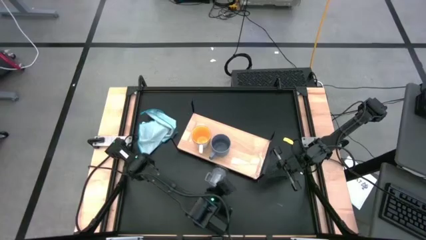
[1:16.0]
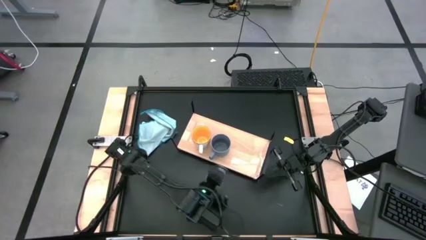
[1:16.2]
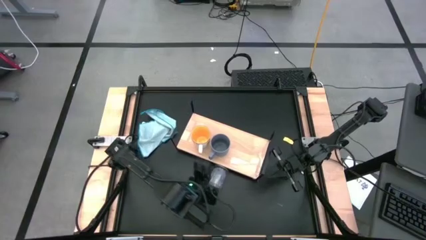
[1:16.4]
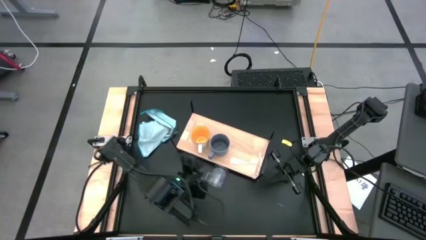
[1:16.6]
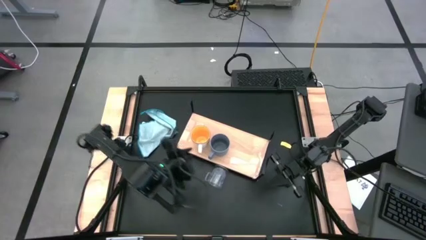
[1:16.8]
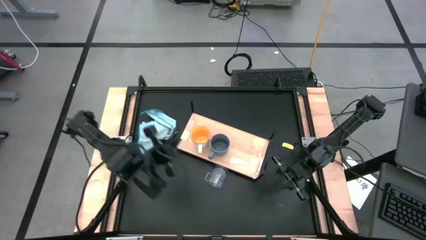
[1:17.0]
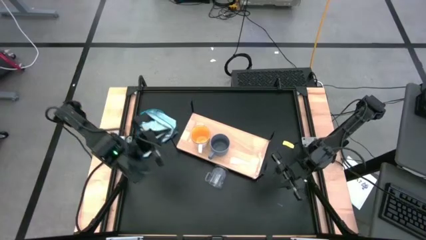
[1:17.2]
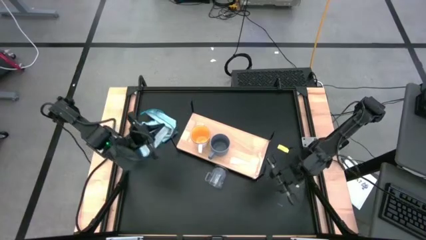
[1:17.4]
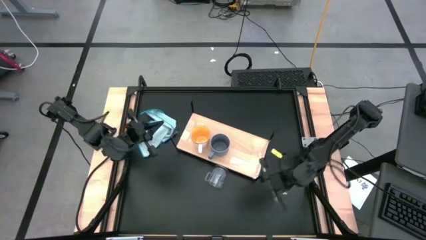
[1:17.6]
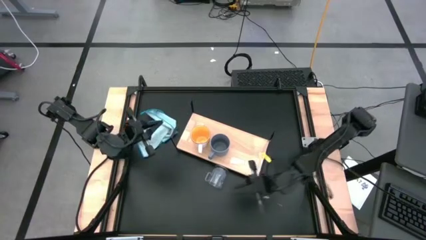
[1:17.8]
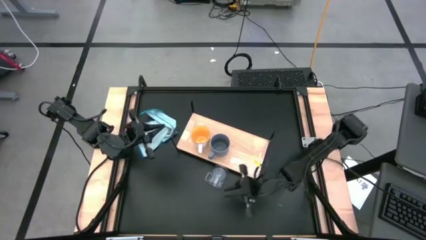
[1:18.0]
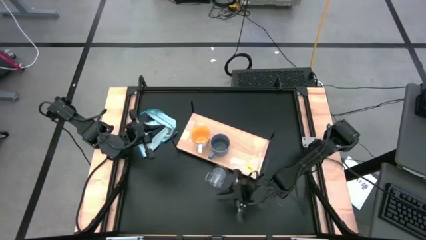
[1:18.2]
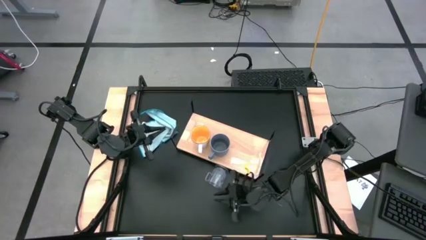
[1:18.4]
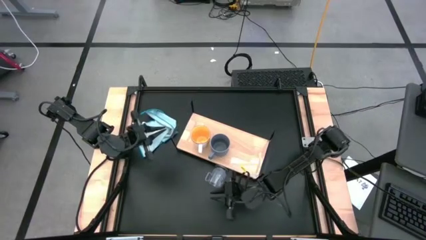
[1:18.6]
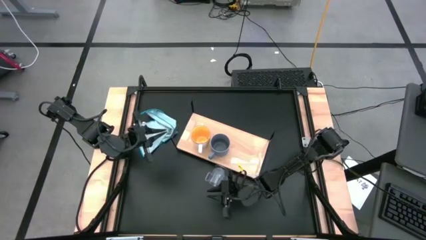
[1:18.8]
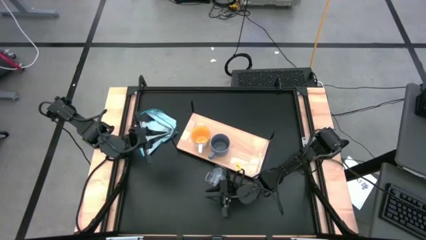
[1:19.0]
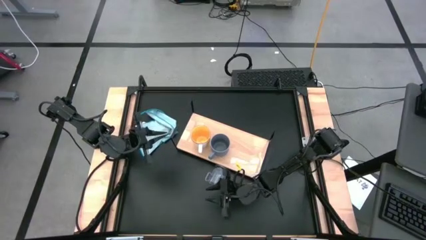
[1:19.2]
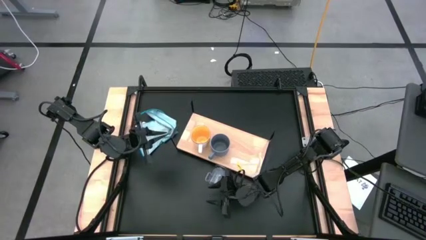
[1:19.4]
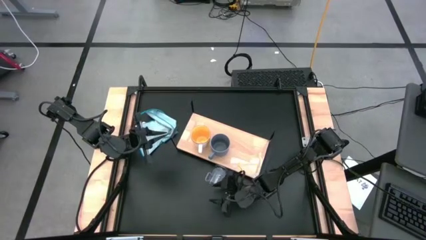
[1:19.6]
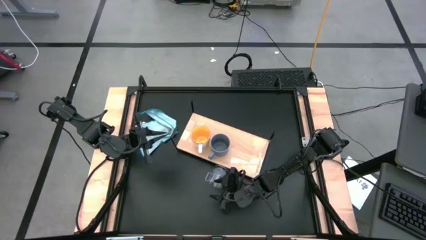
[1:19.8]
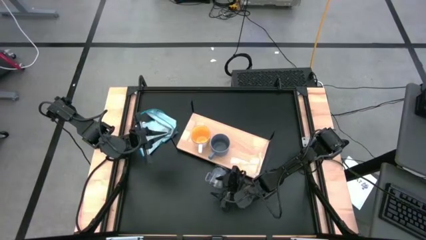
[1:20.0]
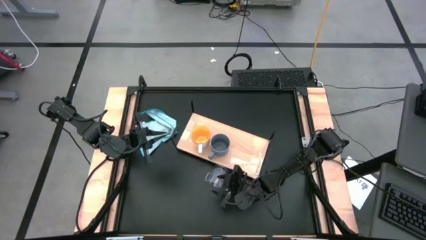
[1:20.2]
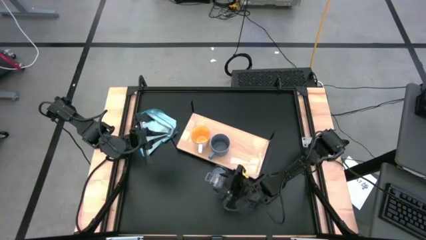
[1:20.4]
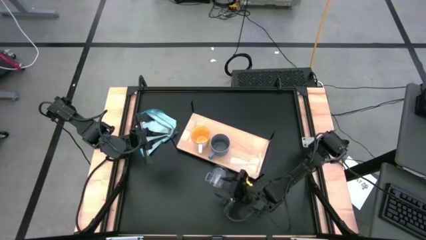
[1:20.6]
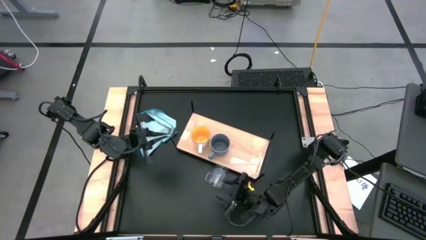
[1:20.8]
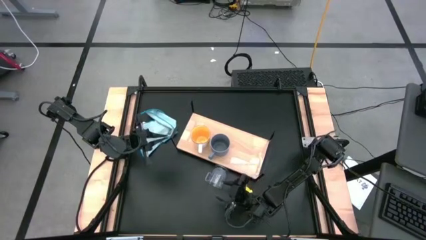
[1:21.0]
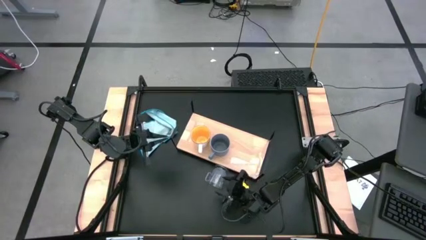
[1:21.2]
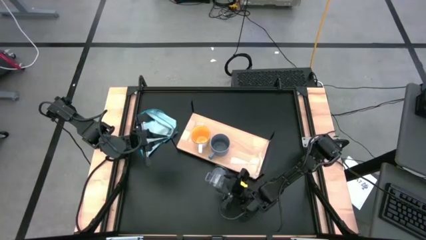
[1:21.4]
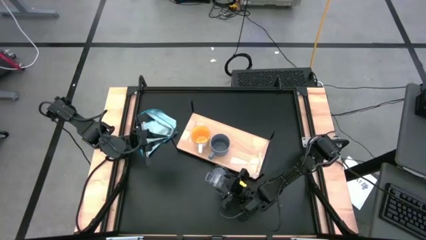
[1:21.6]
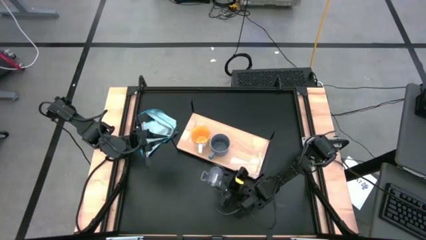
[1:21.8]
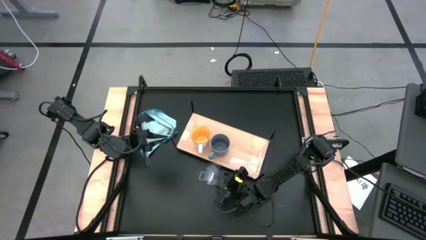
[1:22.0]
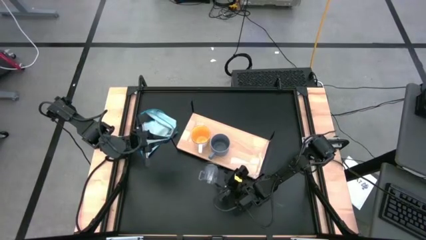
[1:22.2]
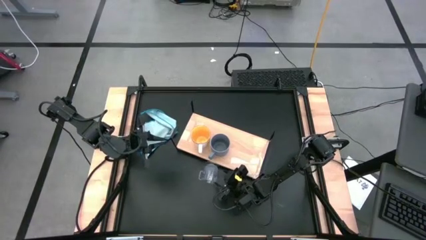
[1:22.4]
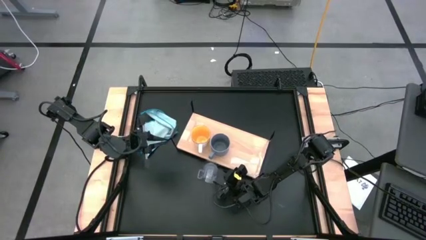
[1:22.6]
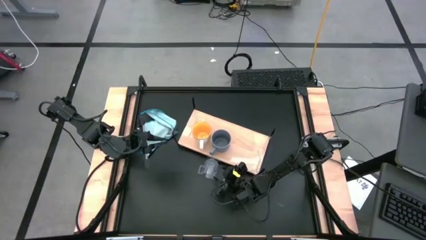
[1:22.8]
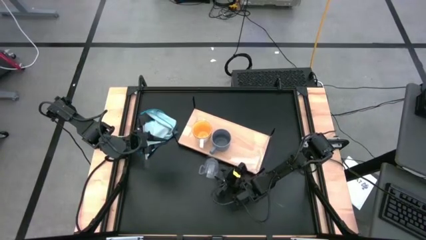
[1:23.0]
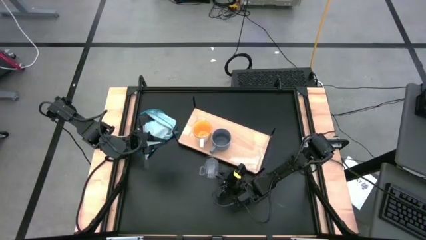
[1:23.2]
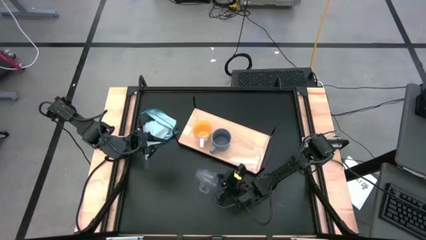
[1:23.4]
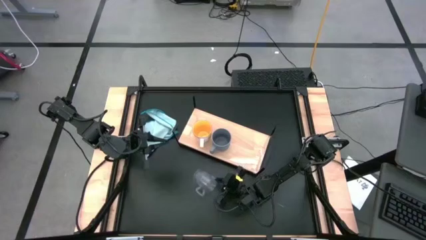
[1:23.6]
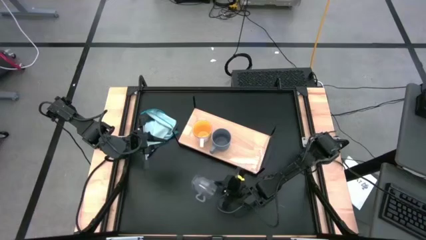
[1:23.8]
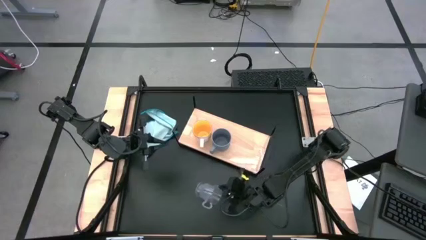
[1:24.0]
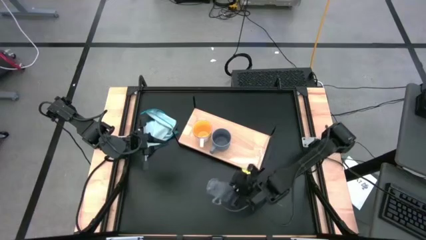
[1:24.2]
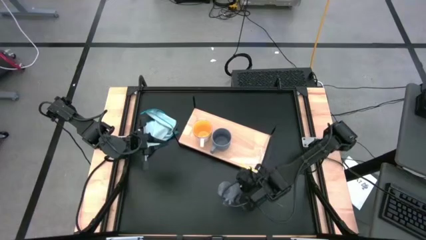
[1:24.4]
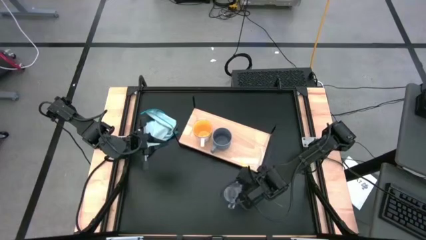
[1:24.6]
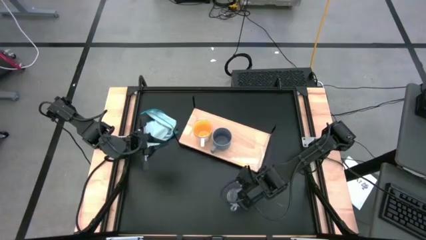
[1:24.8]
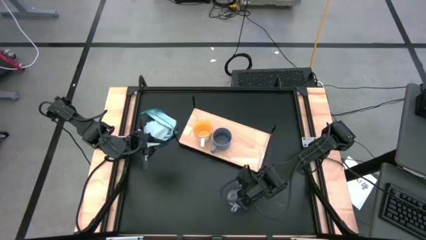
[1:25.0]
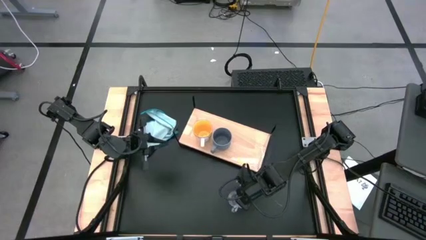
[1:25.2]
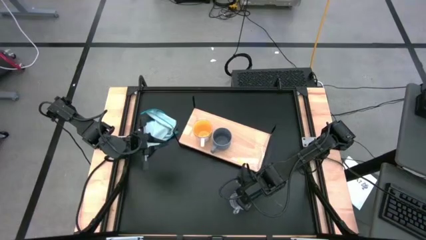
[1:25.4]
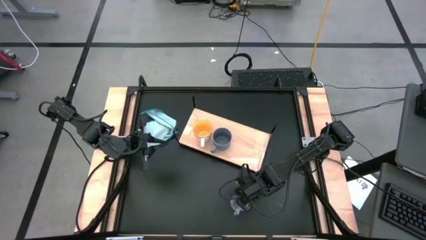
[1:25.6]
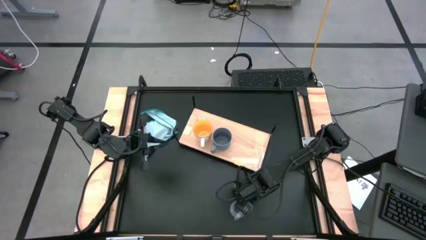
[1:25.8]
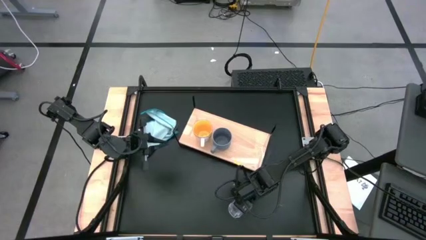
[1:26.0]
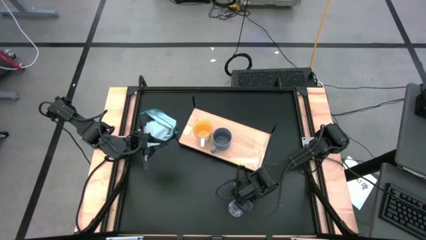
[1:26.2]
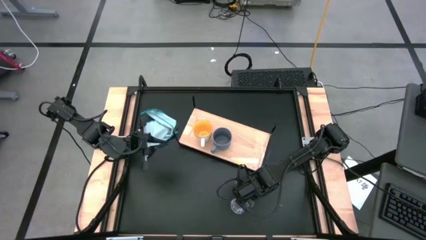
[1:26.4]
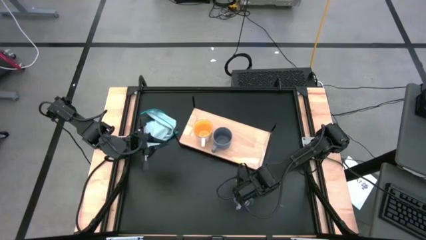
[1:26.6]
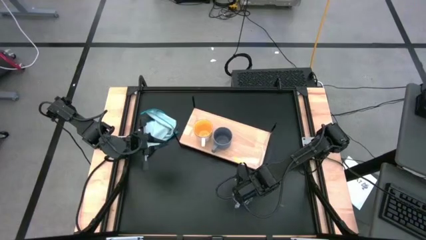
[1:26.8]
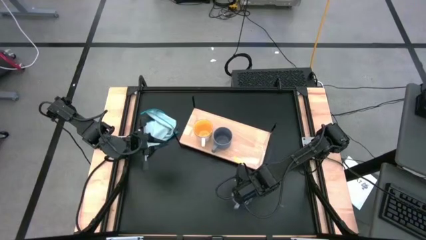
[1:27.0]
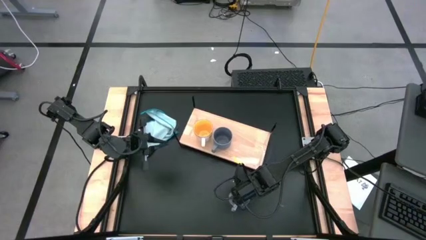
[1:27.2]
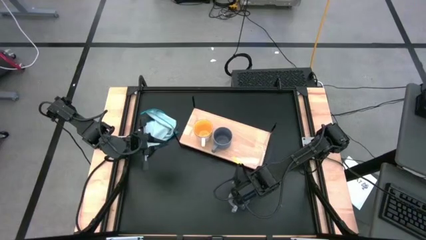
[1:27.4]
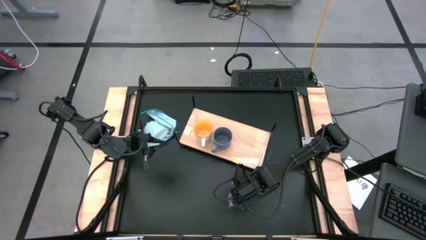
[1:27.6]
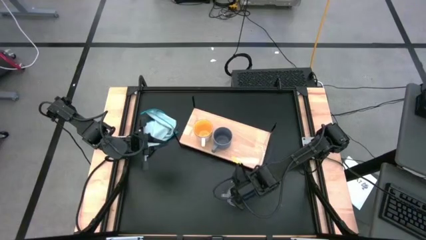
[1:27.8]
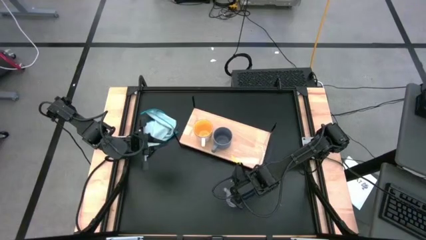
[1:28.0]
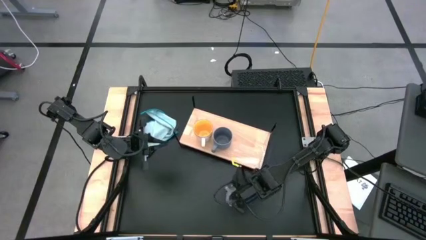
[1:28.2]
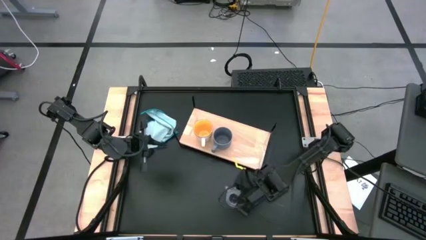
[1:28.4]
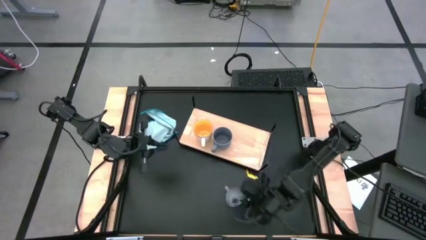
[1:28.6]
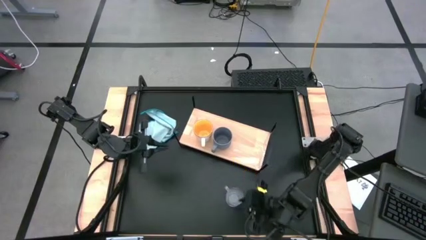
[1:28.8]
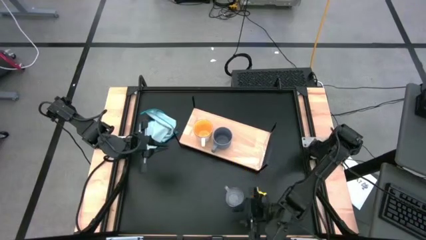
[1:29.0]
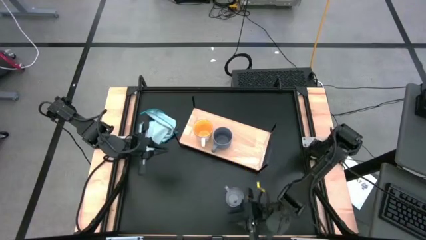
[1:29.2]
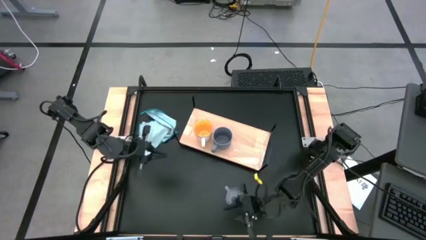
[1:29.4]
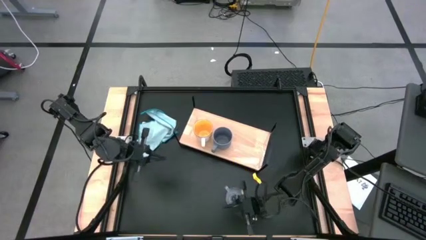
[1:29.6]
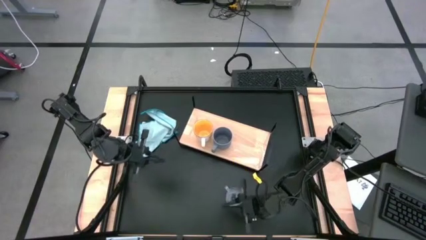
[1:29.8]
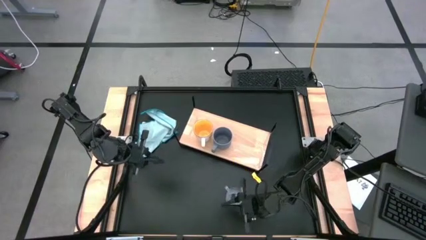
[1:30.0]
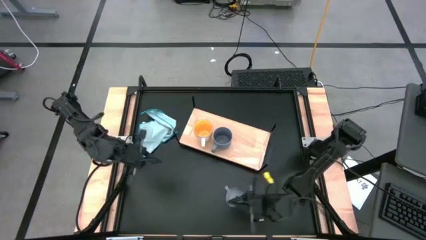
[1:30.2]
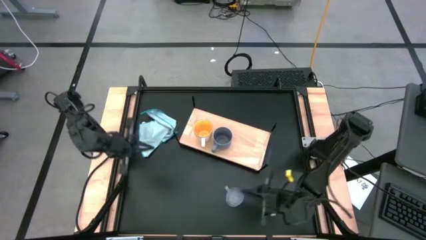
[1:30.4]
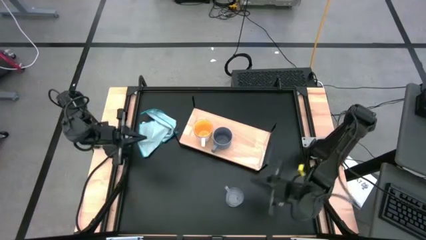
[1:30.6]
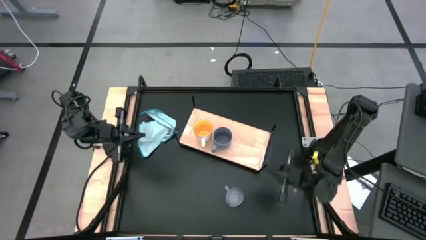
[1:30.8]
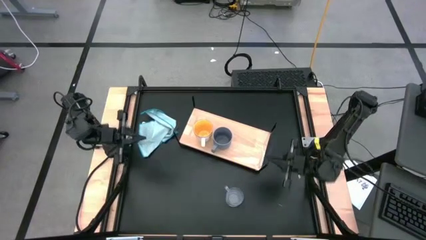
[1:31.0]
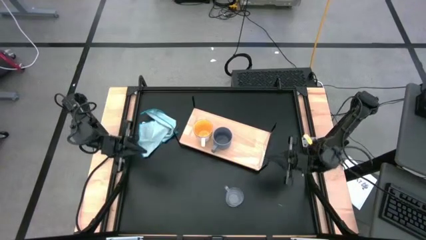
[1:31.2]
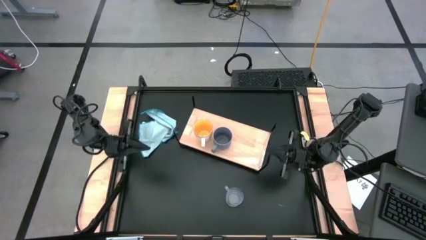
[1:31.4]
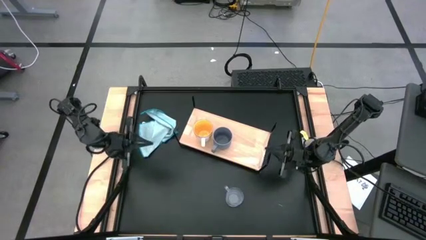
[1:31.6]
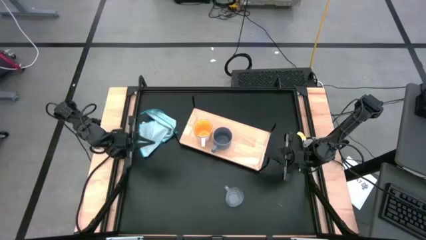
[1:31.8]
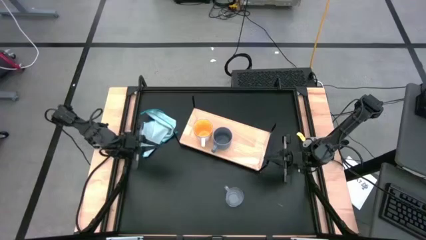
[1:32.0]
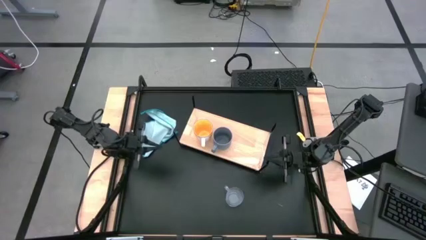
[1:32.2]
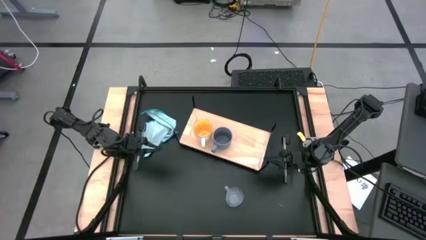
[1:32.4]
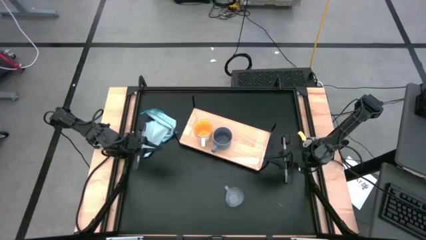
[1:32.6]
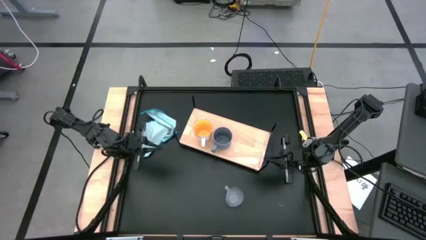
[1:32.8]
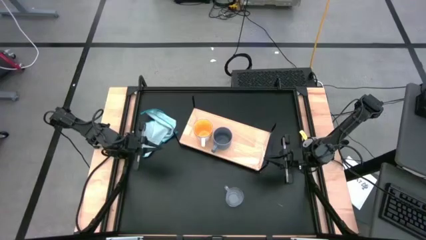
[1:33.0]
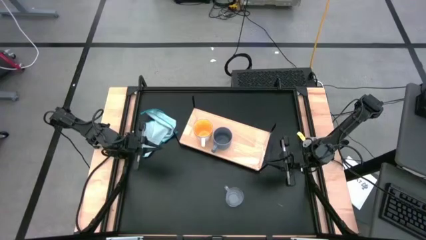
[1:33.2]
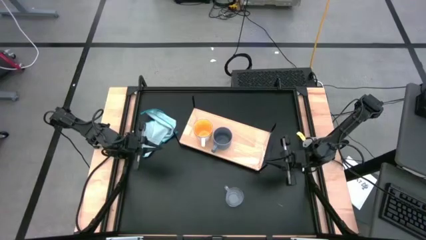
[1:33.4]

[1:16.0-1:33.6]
Task: Stack small to large cups/mugs on shelf
Put the transparent cup on the shelf
